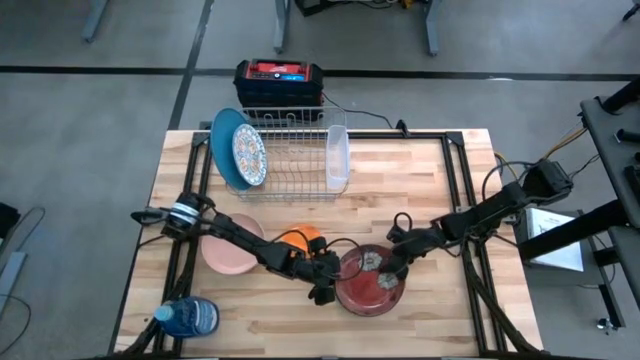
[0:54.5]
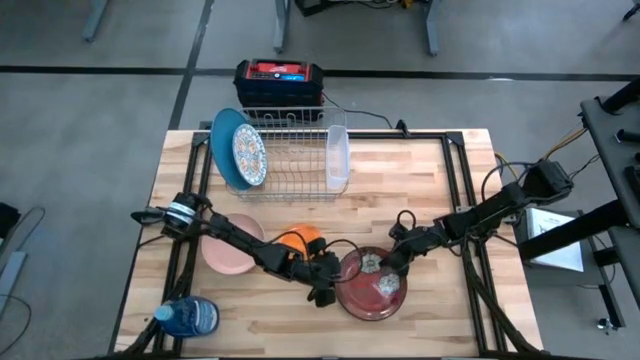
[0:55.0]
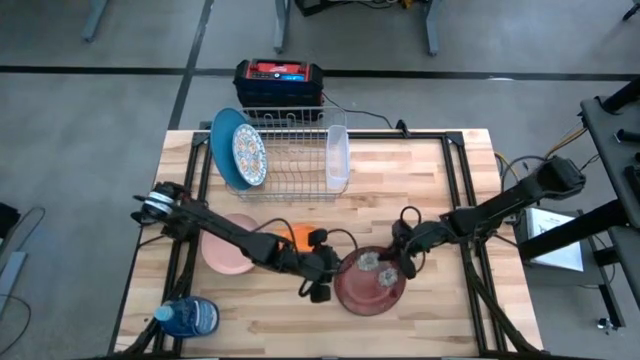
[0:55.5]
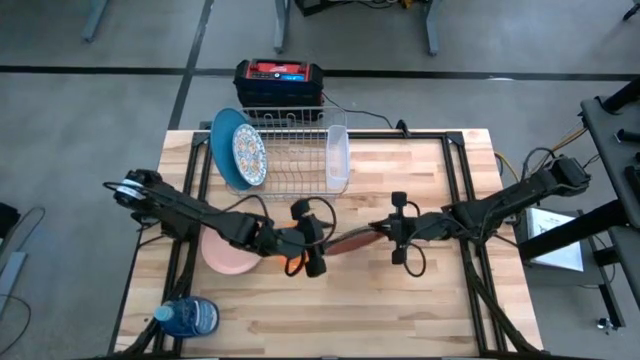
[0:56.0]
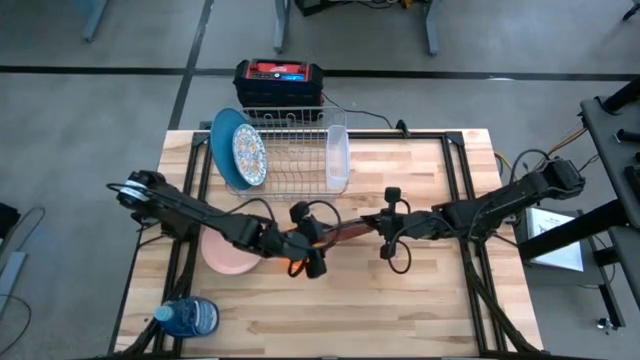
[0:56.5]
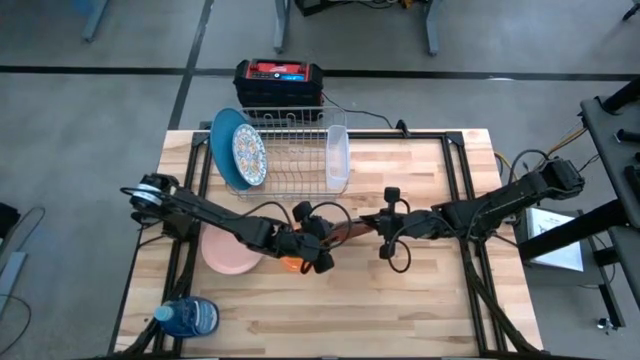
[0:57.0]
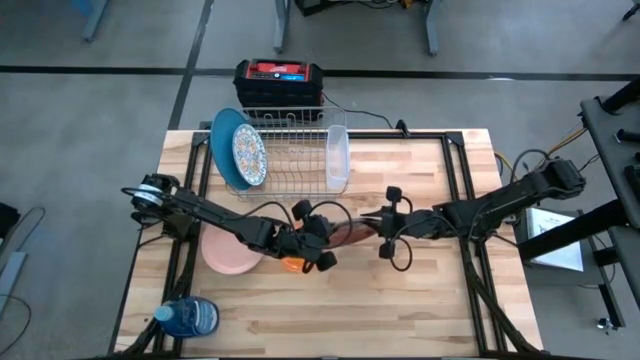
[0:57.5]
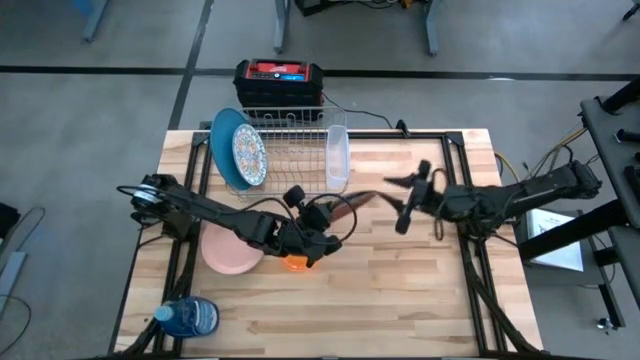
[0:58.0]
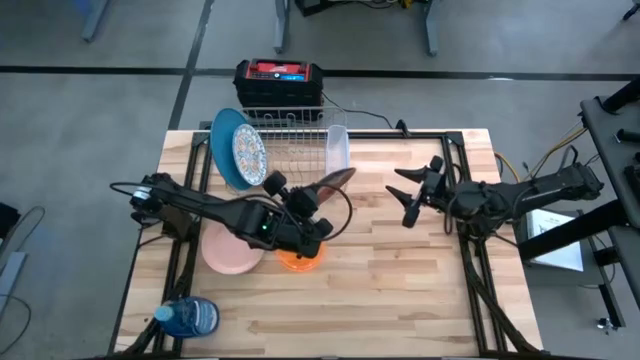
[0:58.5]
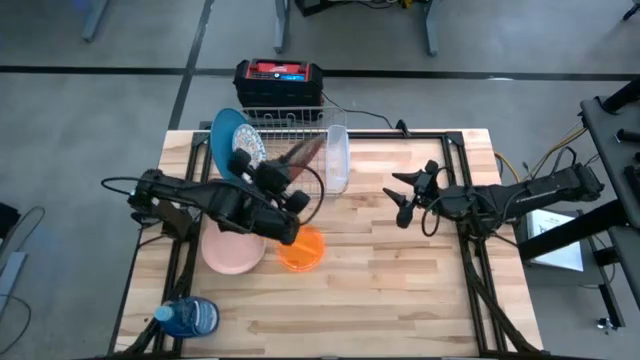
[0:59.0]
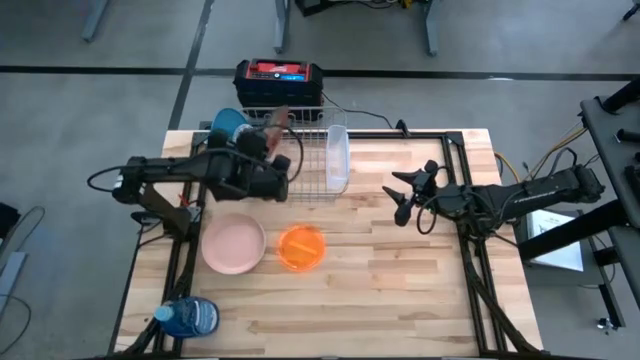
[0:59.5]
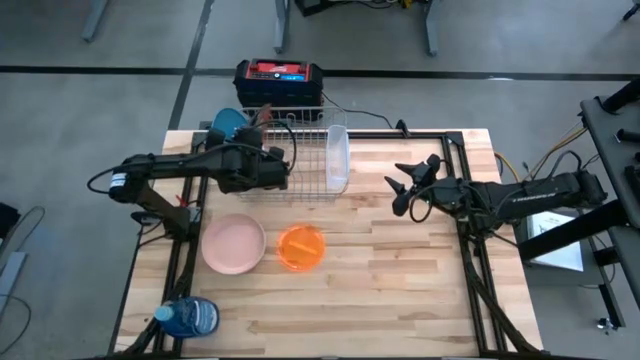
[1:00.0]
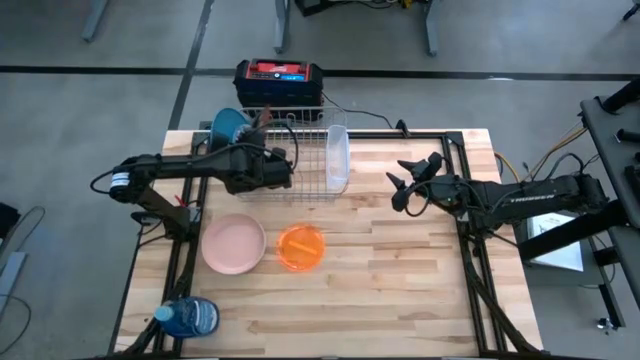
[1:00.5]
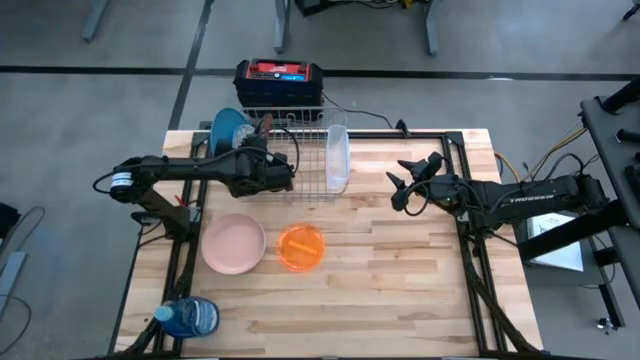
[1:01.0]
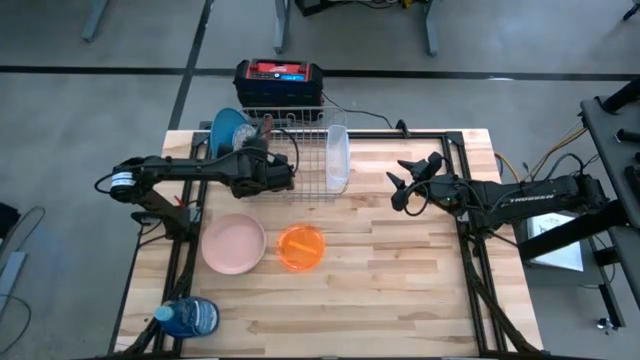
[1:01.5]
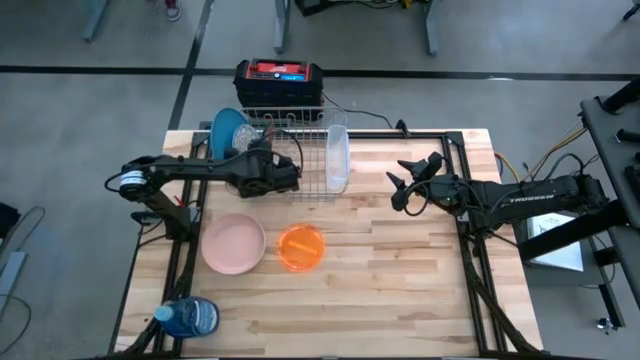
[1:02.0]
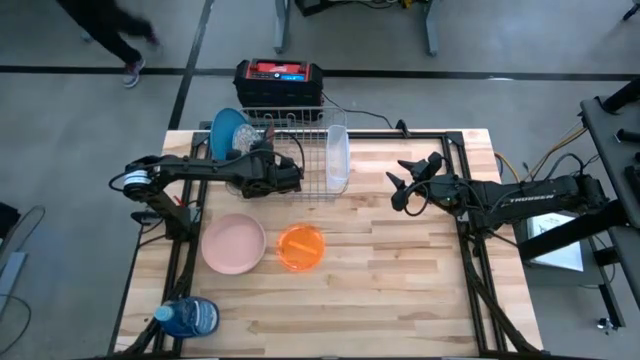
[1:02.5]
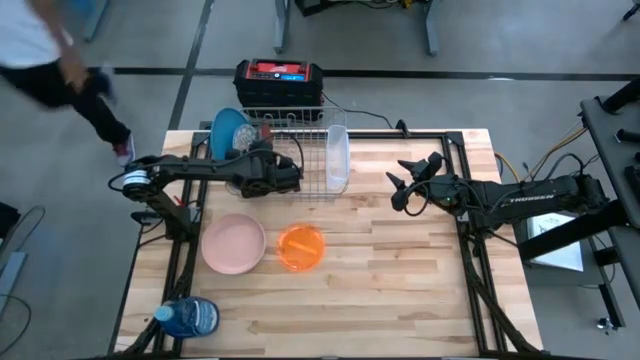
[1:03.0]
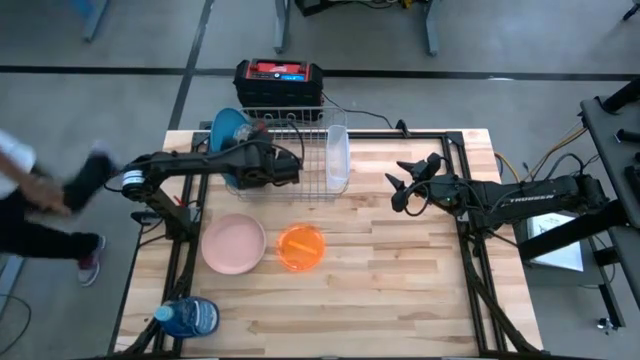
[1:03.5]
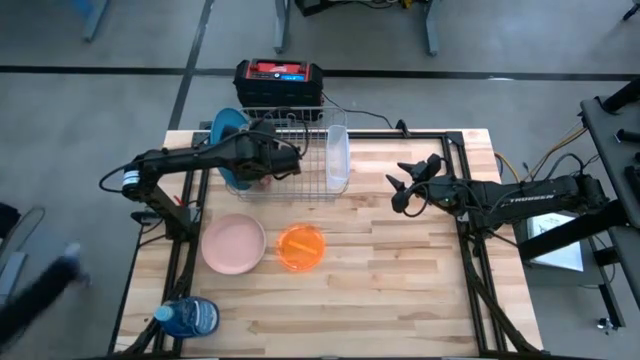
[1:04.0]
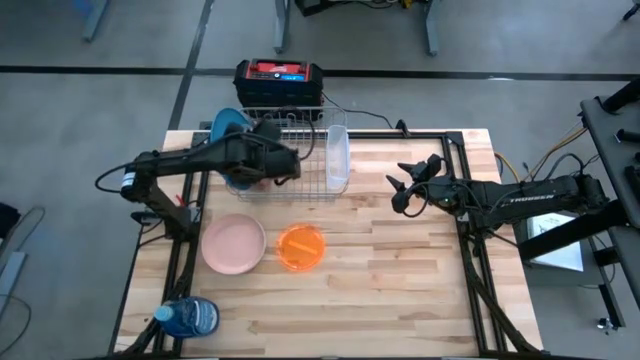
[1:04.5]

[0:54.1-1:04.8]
Task: Sort dishes
Put the red plate in the dishwasher rack

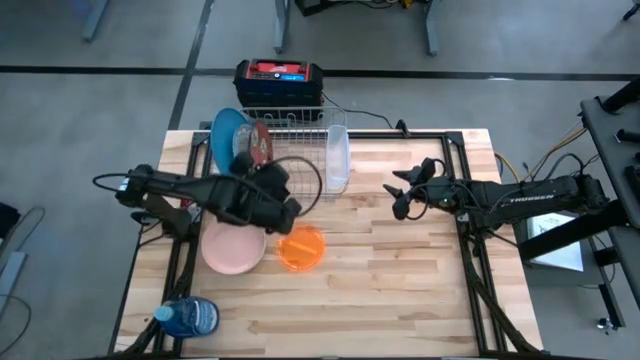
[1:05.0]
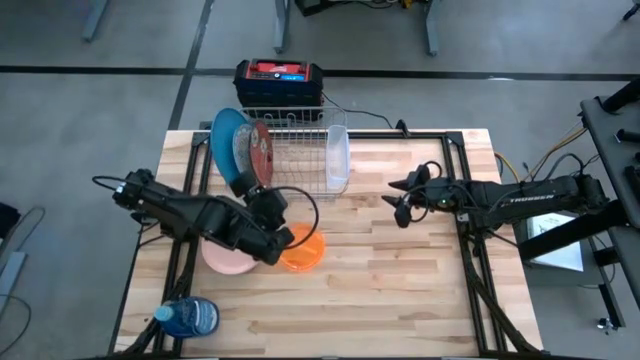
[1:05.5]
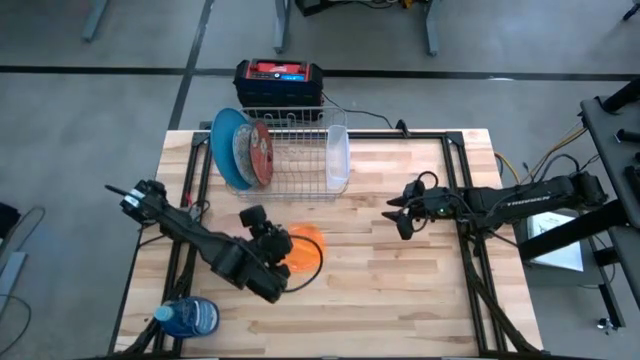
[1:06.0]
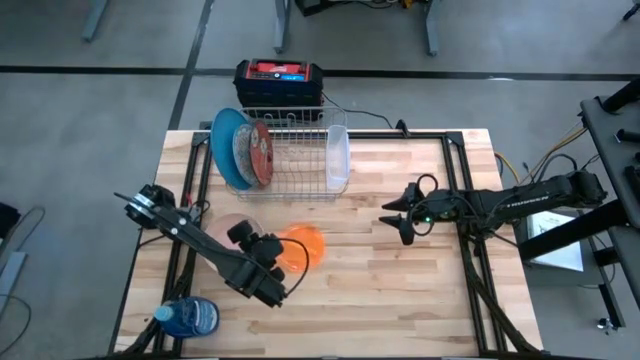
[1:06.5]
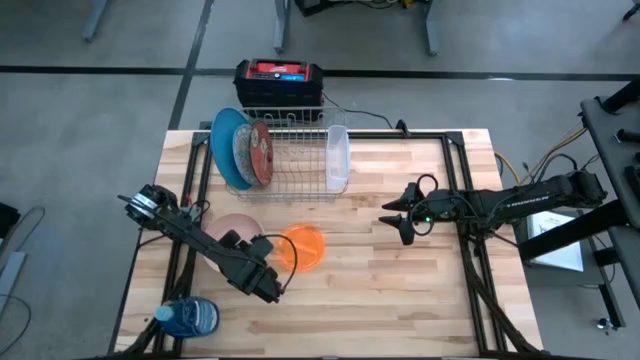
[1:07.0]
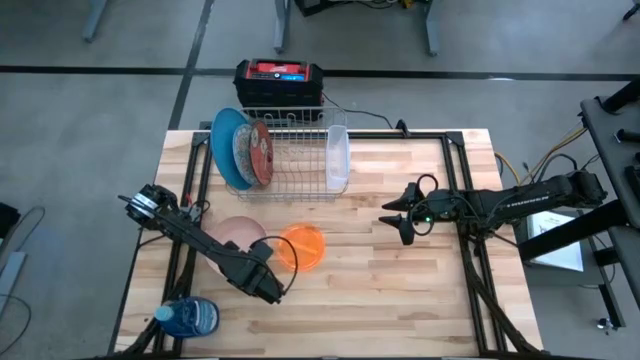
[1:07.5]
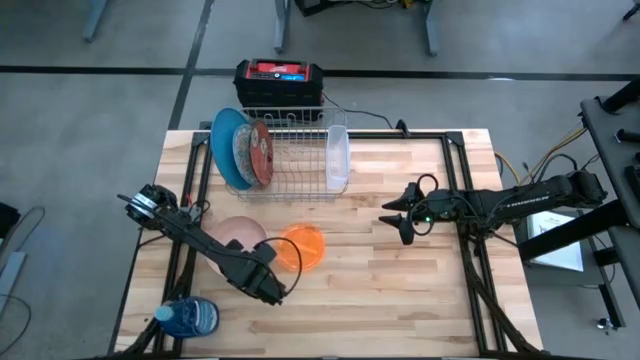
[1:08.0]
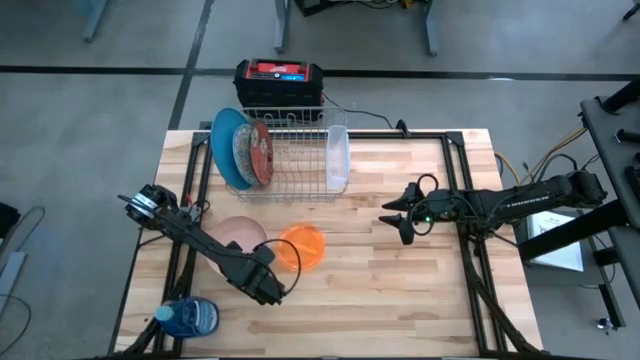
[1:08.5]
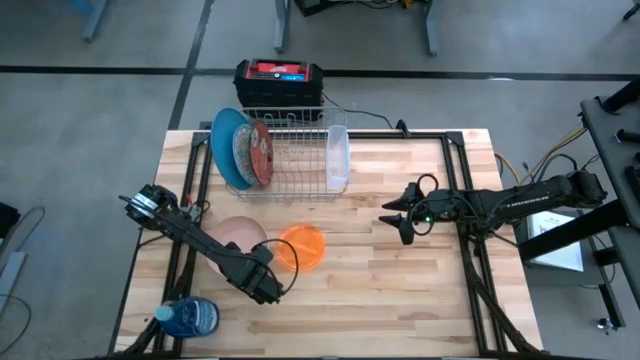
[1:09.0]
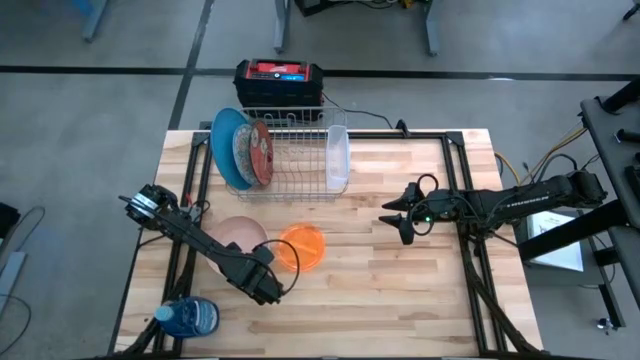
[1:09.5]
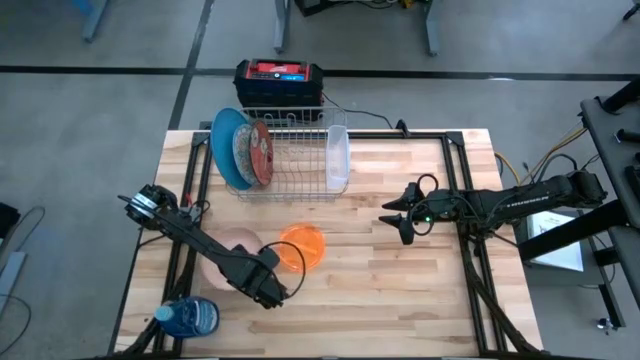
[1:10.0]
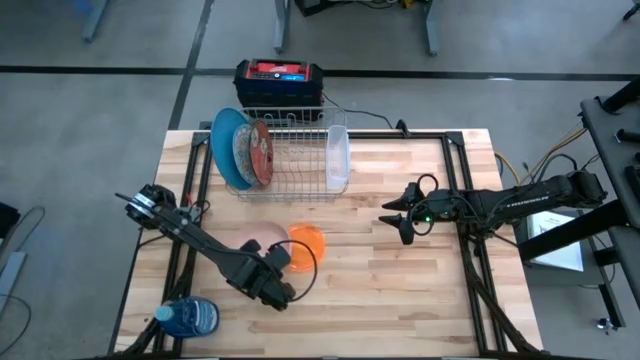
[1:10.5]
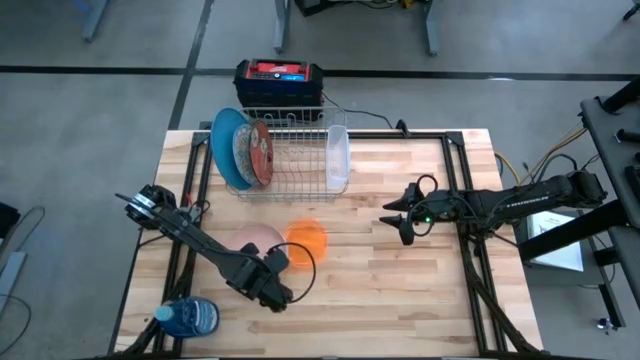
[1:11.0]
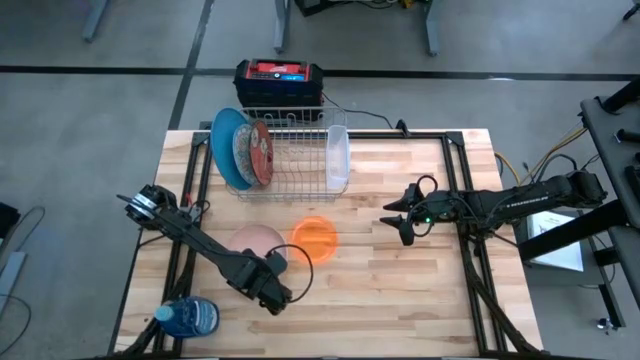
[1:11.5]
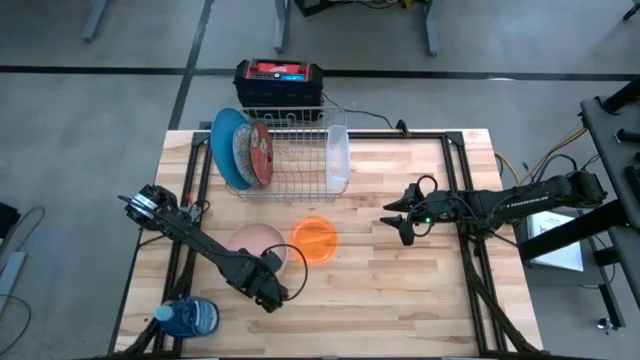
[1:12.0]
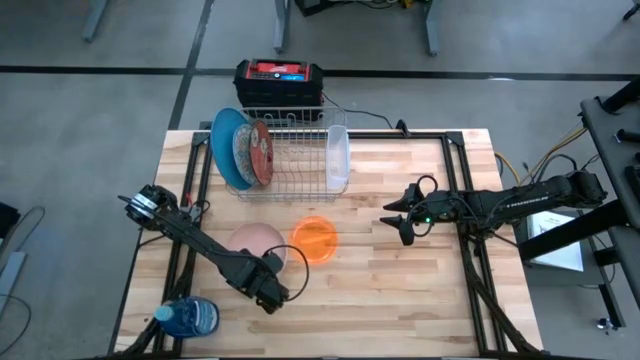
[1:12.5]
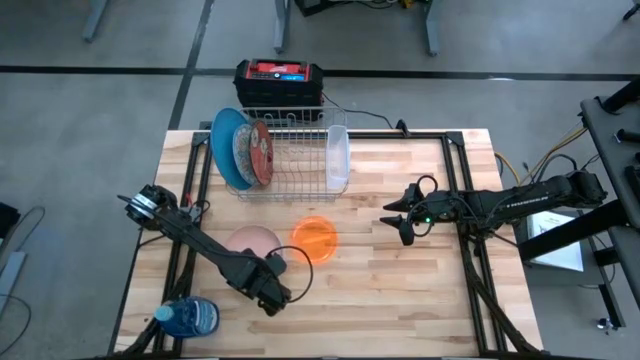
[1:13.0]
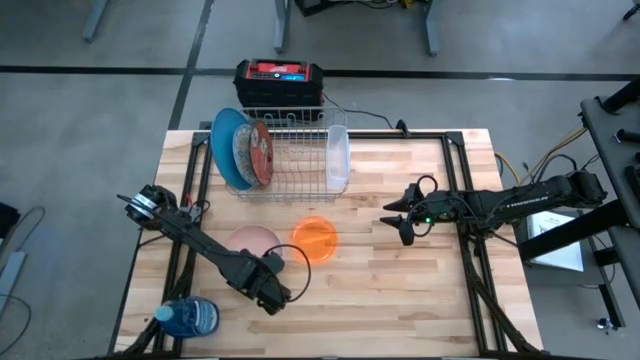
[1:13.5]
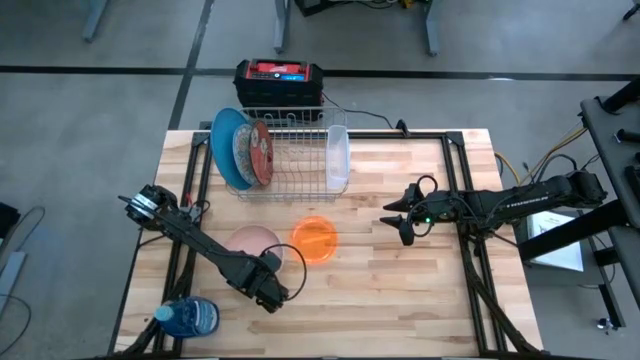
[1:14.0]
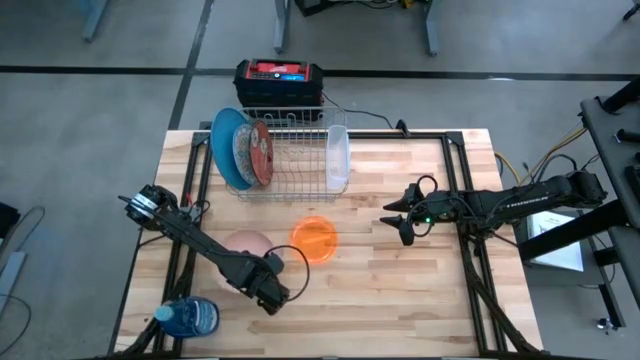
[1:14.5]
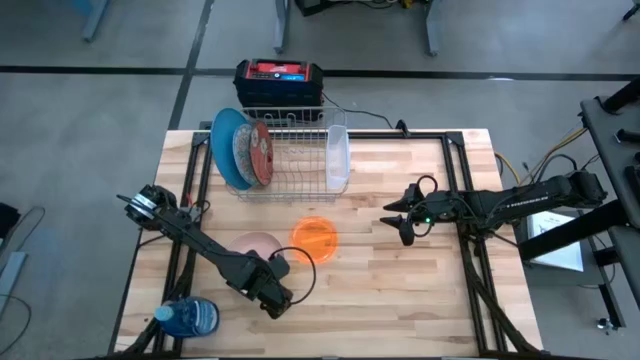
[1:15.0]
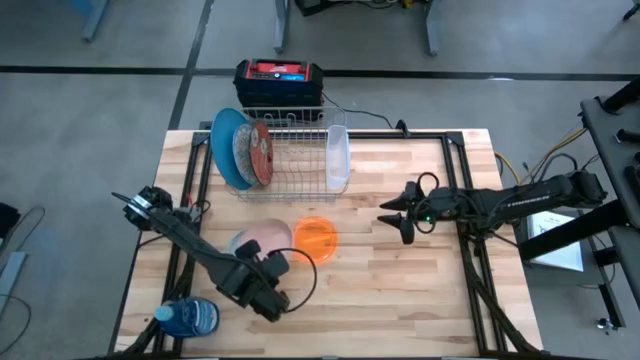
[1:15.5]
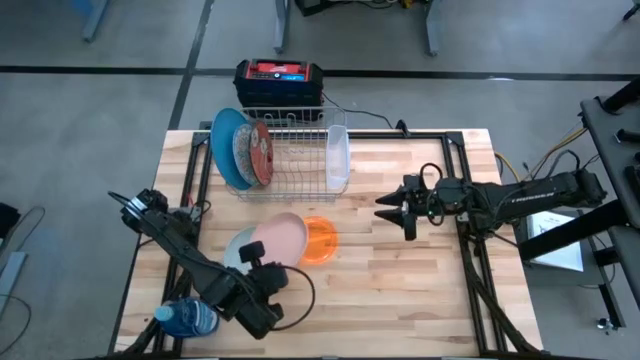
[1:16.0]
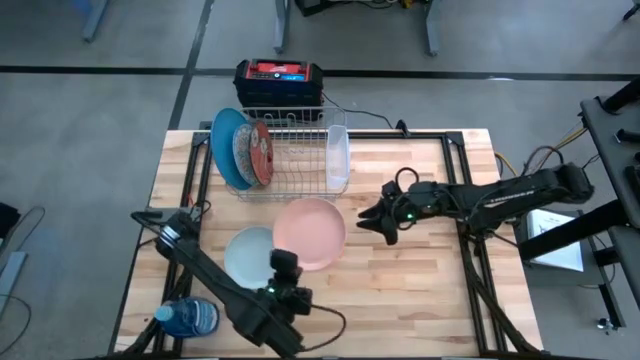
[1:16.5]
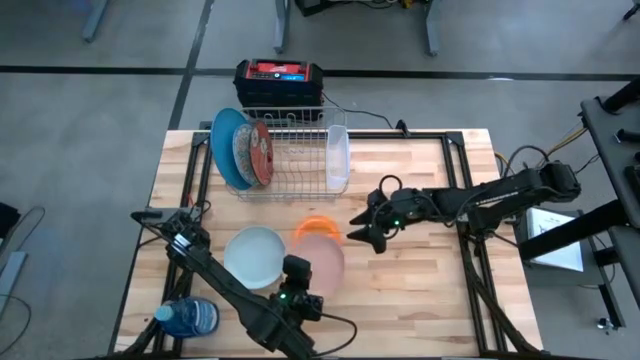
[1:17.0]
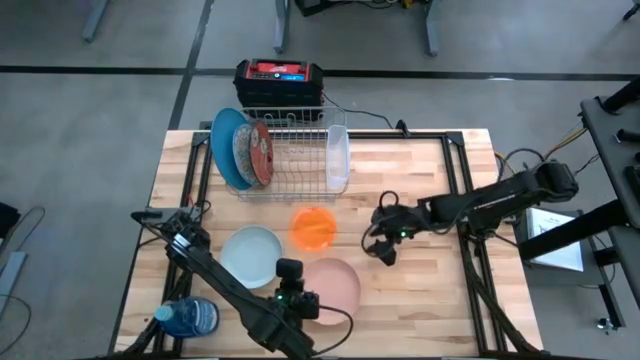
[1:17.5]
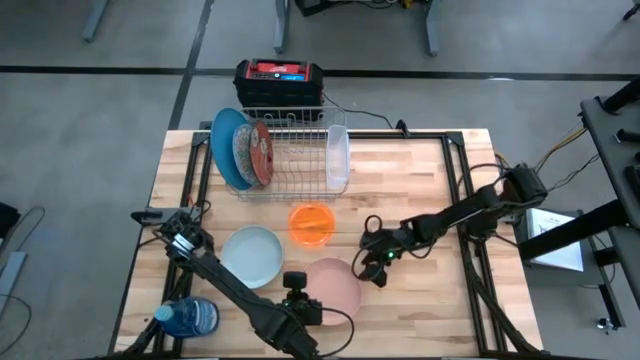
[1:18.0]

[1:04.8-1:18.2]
Put the pink plate in the dishwasher rack
